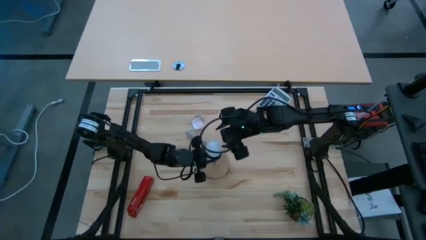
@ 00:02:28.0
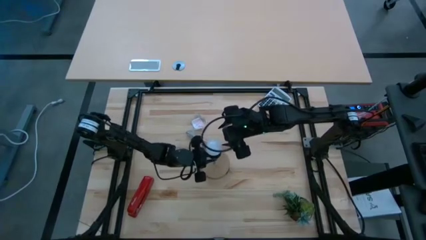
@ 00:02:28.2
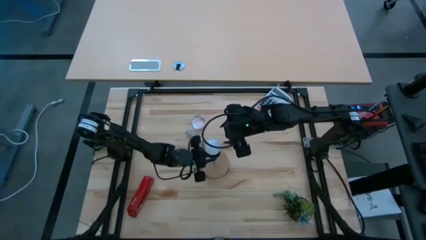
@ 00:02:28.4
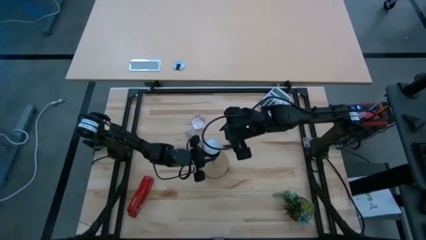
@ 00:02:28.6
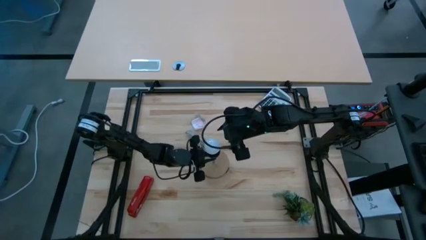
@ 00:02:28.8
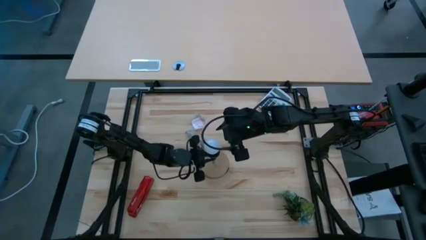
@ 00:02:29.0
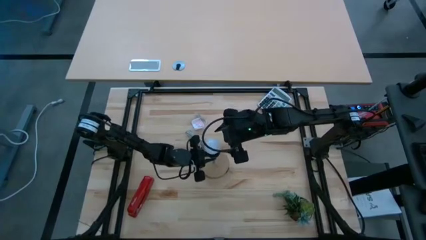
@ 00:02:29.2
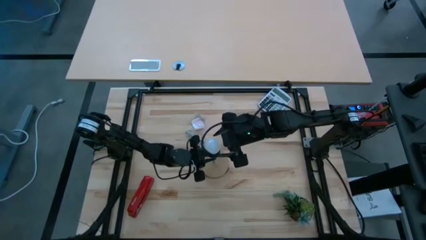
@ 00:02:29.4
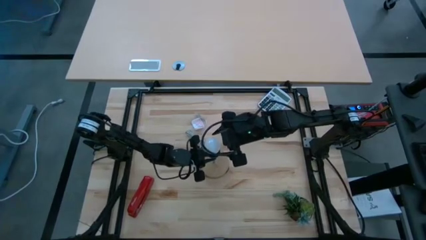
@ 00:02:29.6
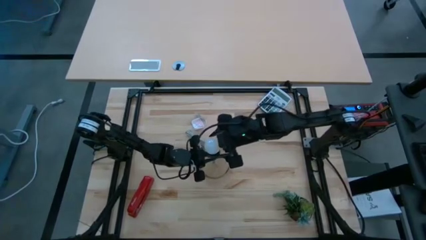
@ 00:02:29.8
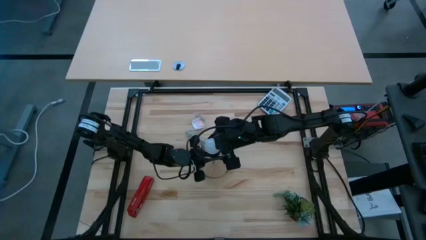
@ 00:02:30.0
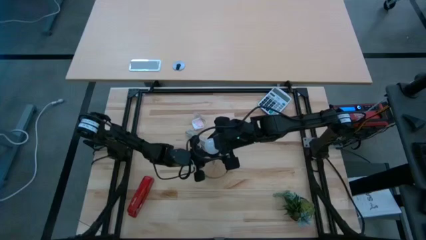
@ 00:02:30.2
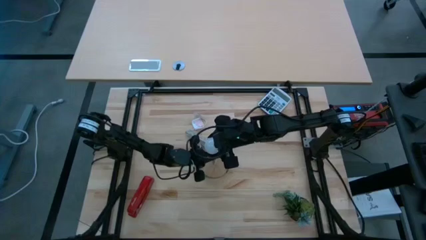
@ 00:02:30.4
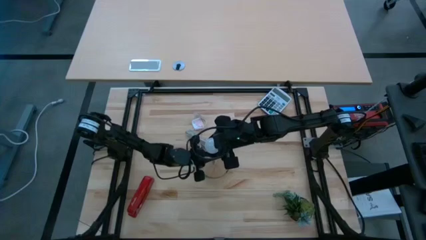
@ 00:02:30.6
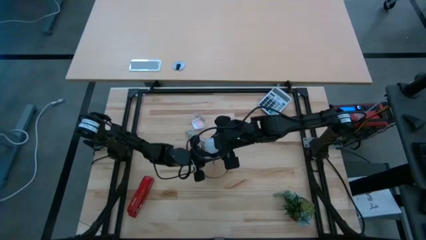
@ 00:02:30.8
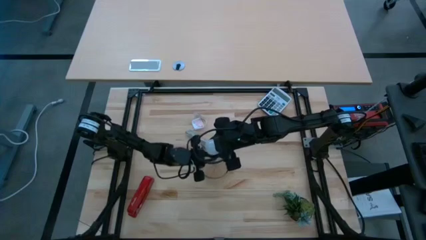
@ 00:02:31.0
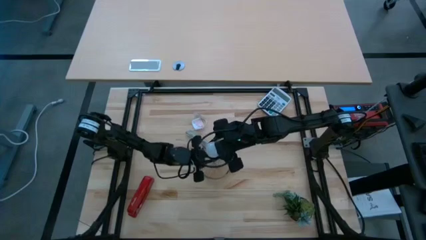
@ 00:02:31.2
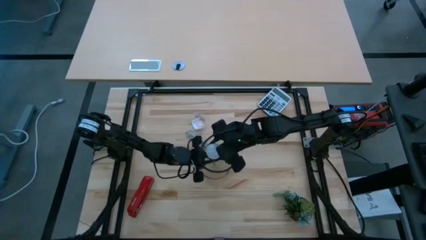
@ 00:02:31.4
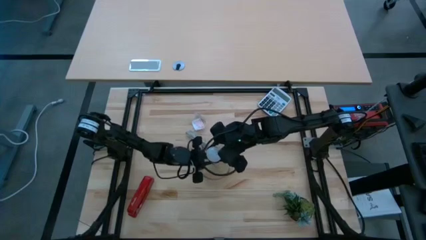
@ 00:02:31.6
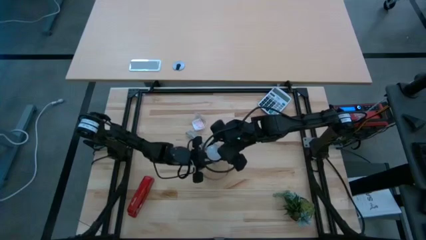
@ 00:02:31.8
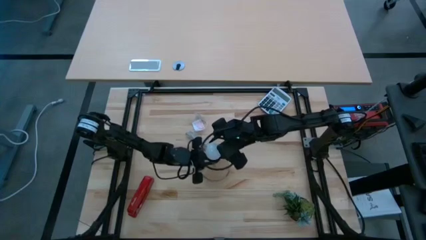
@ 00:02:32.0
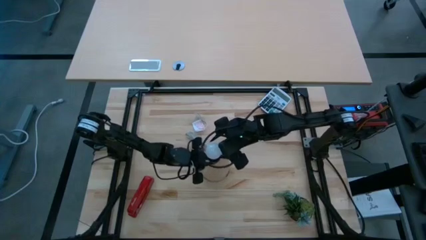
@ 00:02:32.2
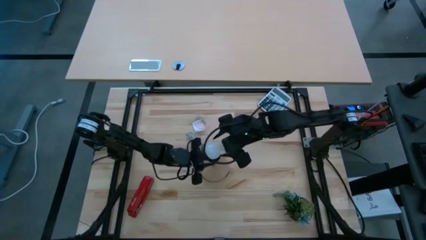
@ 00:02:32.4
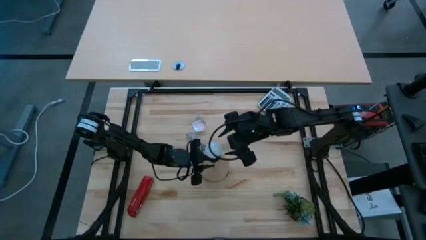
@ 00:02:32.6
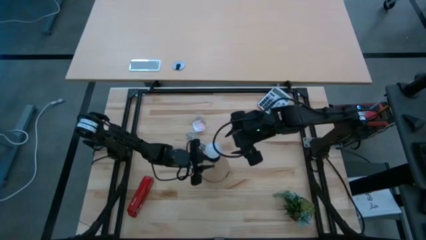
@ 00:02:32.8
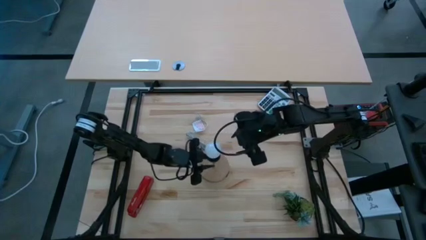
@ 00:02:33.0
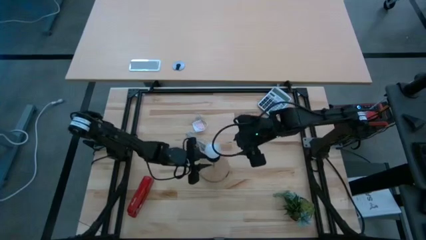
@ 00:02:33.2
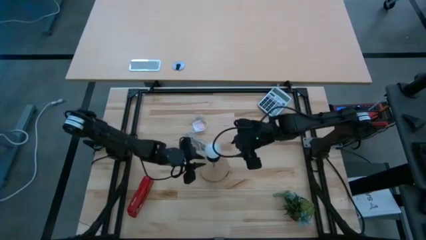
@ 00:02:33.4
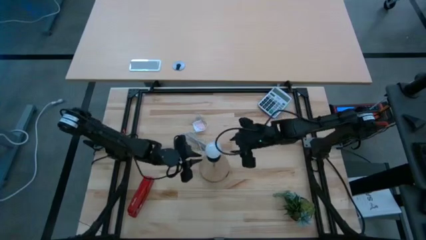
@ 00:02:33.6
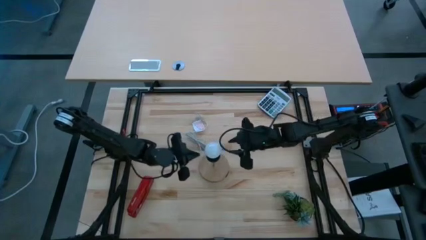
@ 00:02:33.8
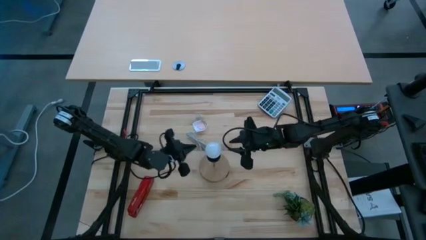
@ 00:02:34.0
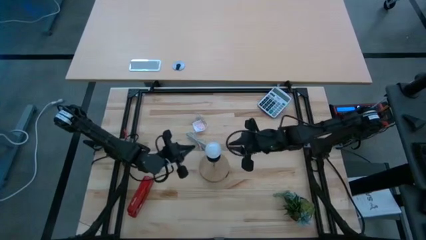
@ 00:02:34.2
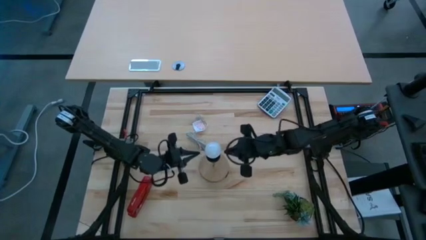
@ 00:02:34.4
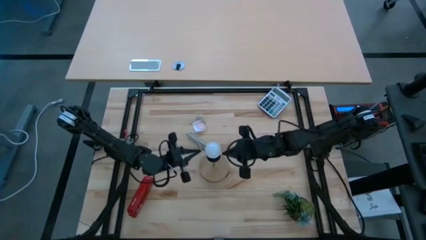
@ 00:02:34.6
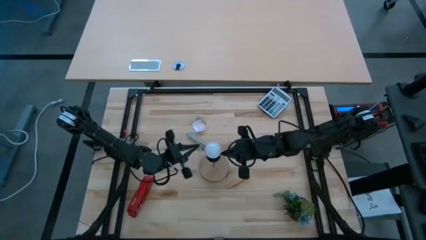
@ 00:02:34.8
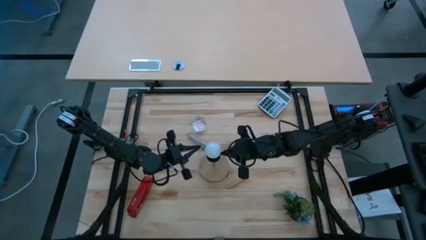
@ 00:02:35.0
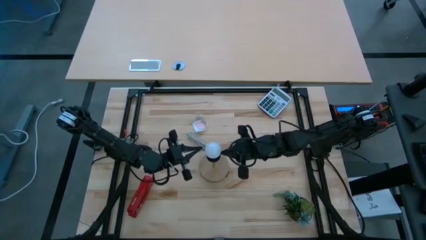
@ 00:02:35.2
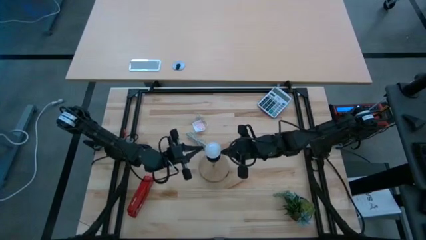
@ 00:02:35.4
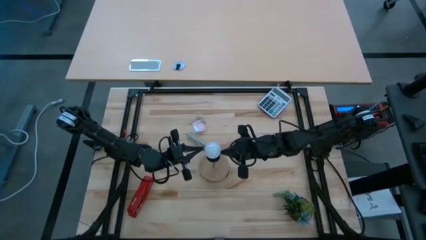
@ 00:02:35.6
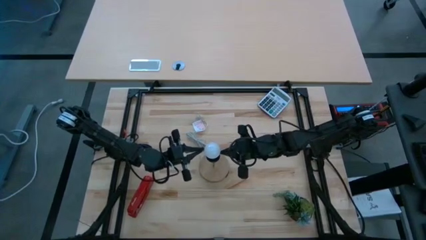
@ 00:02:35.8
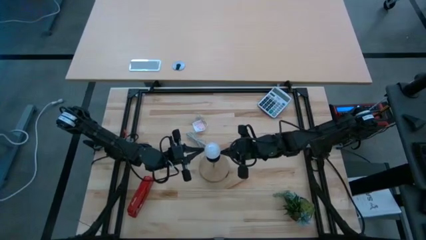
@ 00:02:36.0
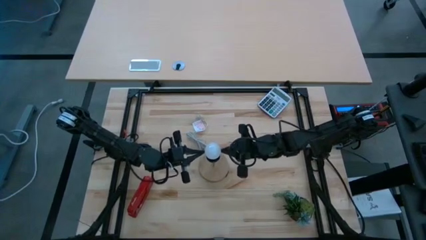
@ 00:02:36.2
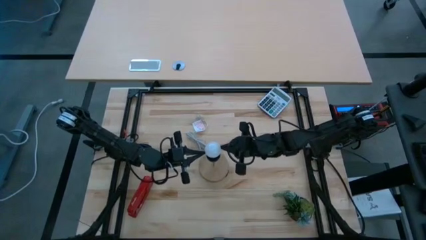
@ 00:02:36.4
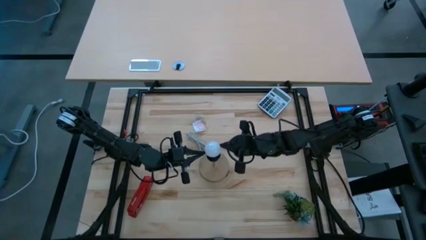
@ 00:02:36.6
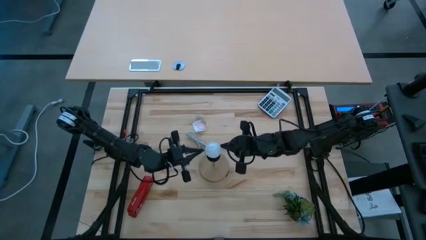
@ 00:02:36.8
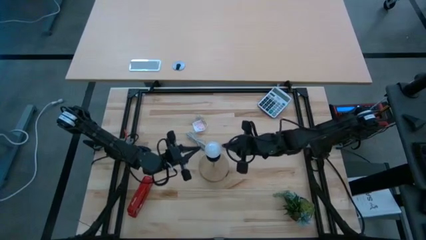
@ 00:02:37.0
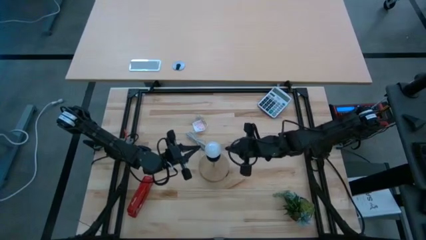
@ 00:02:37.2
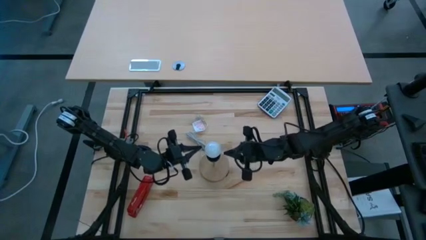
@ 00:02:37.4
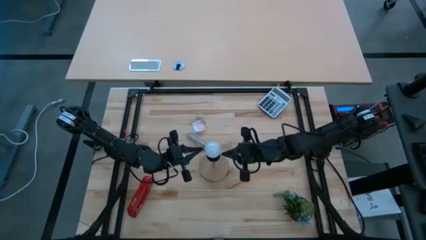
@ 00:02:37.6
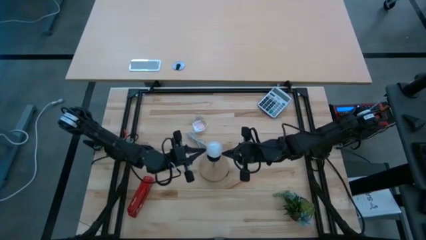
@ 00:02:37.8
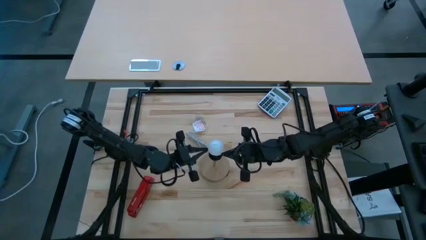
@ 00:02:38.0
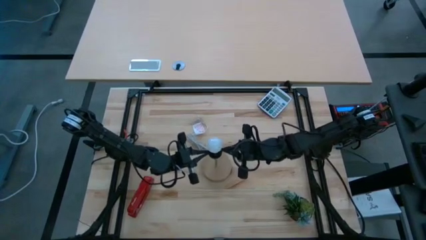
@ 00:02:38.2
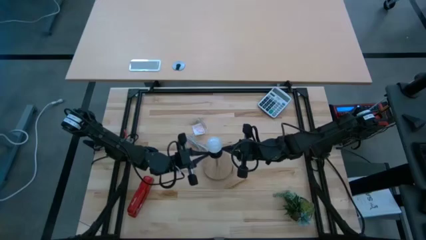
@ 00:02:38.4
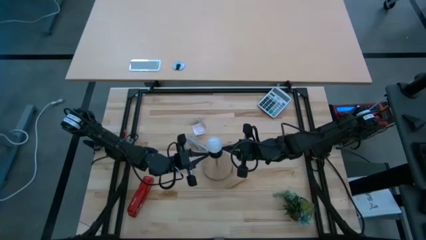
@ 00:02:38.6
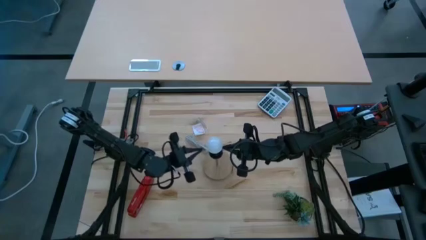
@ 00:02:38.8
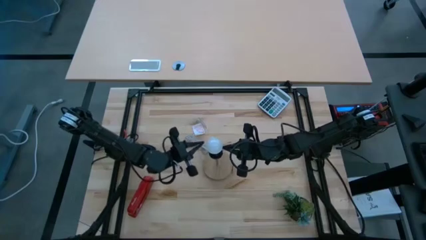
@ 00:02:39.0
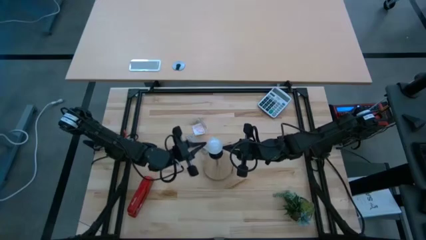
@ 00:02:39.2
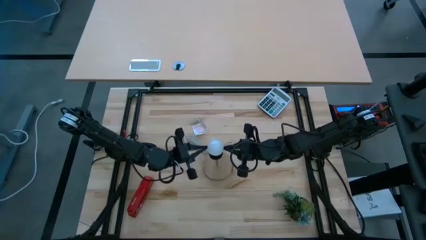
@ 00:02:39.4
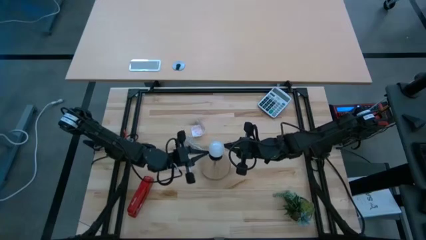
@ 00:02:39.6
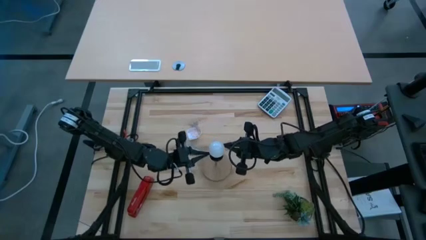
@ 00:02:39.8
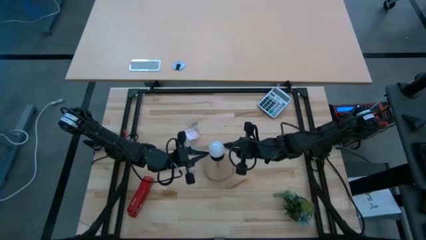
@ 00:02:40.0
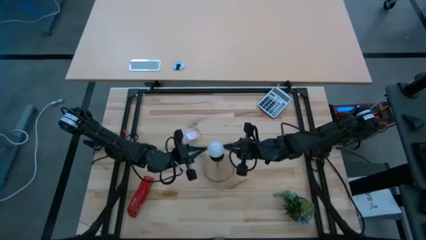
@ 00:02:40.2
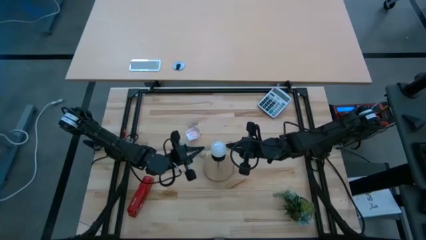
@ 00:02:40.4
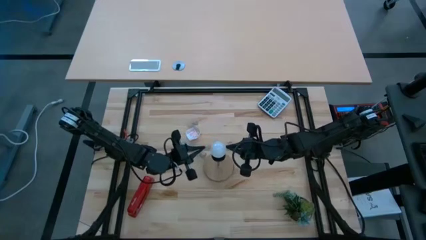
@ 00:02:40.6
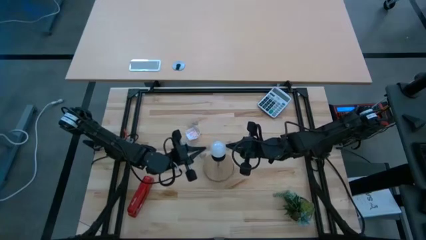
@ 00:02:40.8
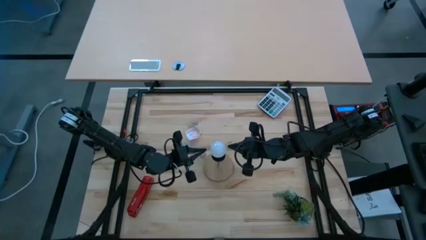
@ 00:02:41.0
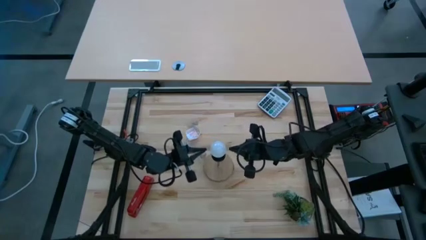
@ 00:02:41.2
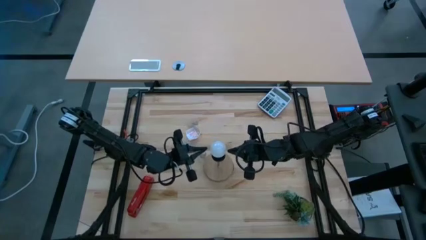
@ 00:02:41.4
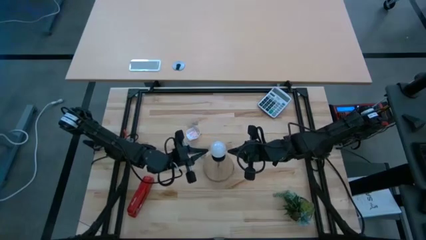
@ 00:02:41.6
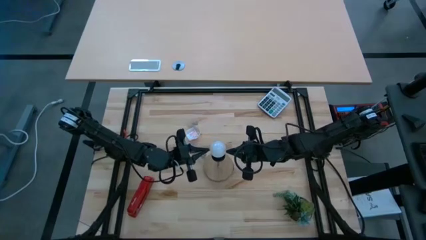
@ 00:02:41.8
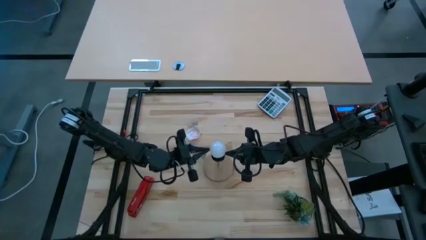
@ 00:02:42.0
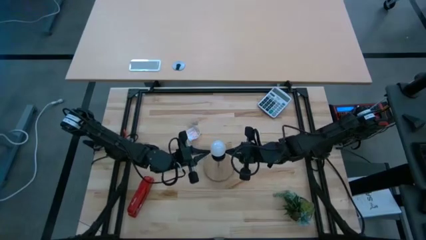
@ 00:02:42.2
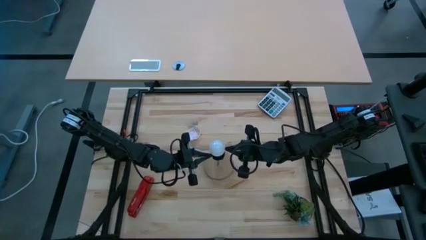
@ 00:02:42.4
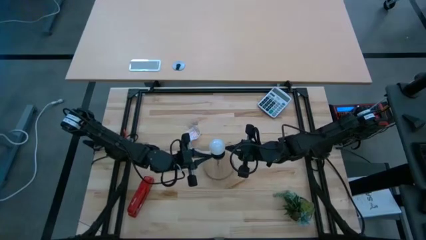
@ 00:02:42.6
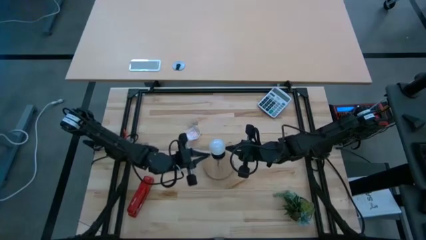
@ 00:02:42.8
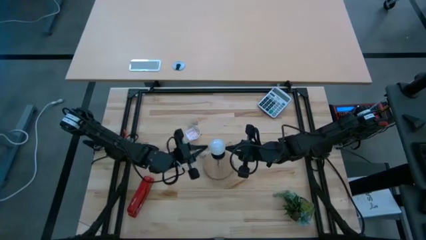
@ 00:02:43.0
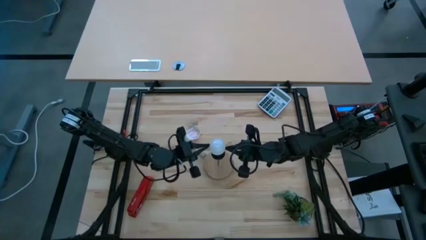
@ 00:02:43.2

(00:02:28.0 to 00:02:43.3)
Task: Screw lightbulb
Remove the lightbulb from the brown lamp
